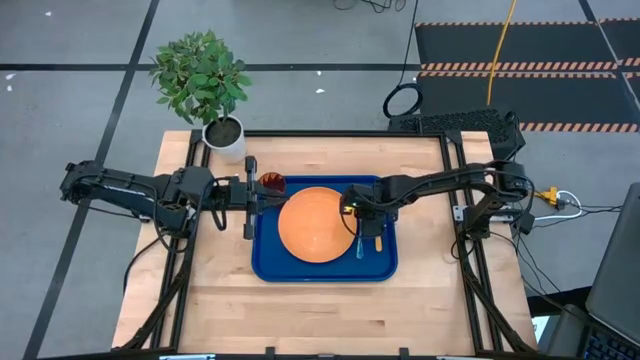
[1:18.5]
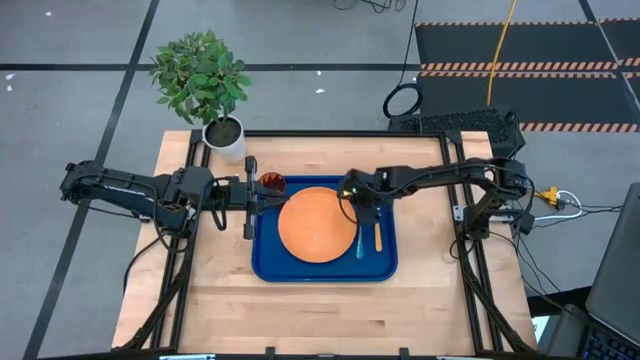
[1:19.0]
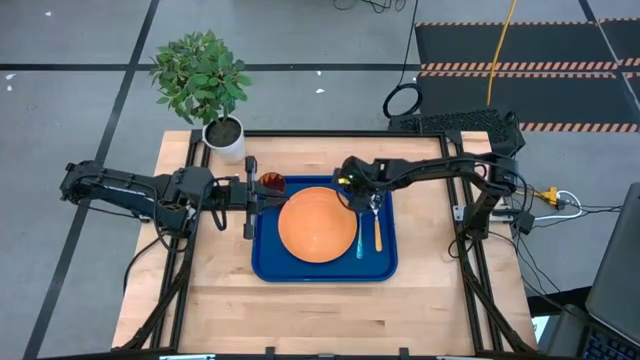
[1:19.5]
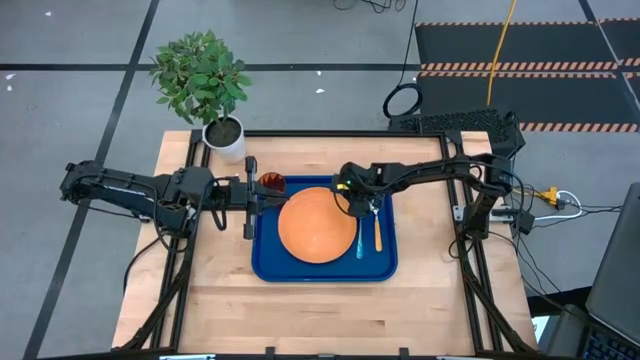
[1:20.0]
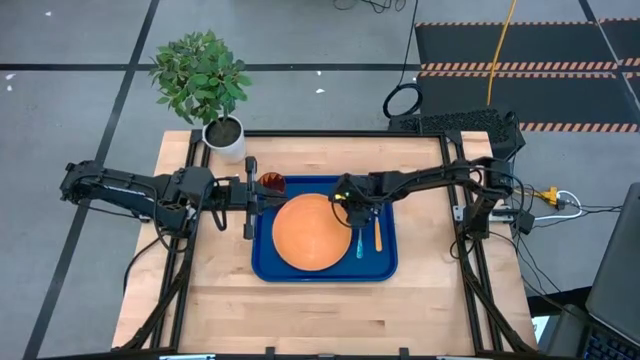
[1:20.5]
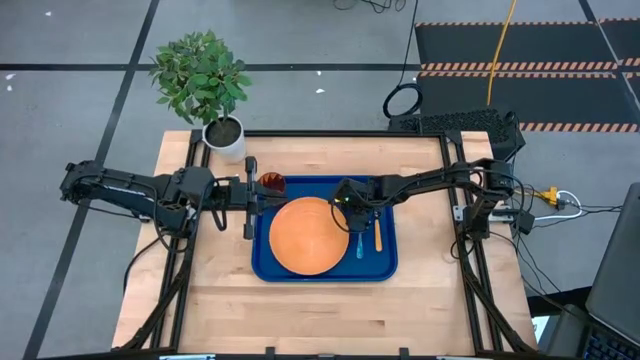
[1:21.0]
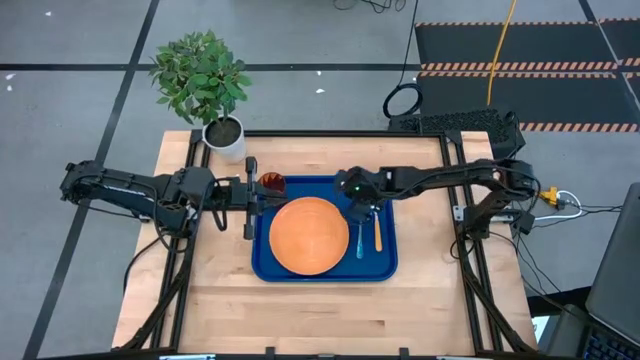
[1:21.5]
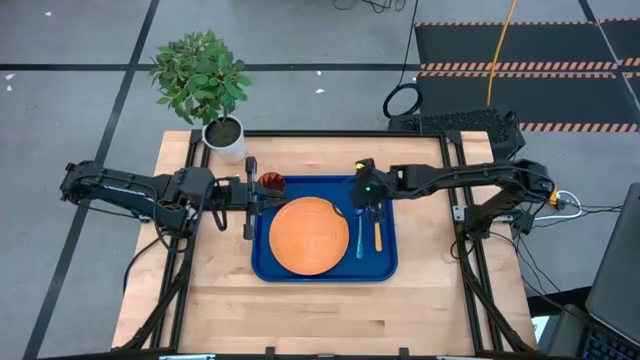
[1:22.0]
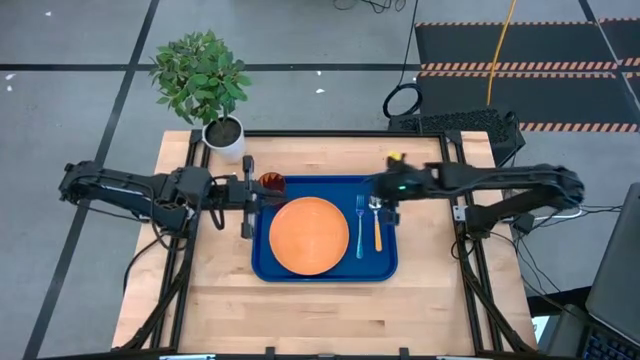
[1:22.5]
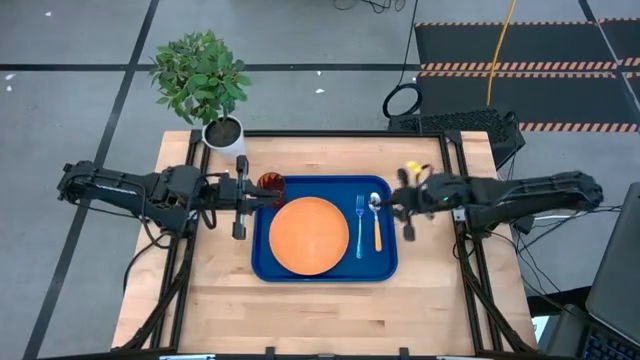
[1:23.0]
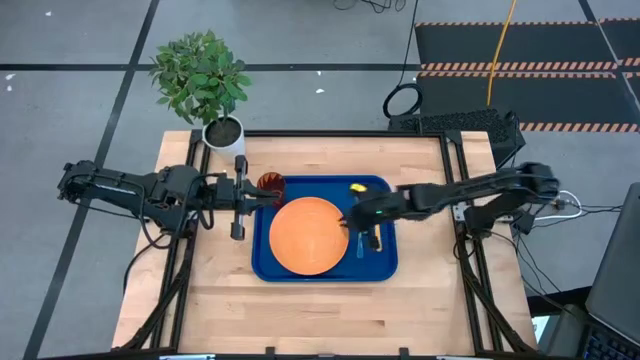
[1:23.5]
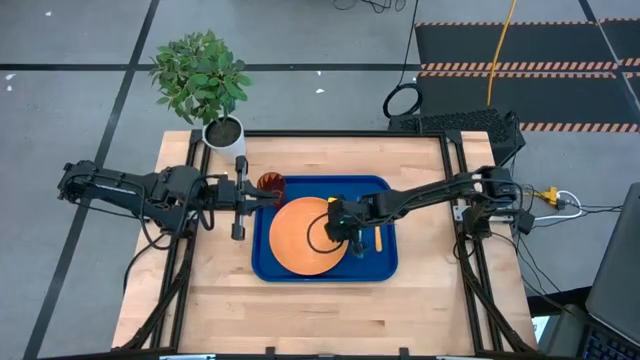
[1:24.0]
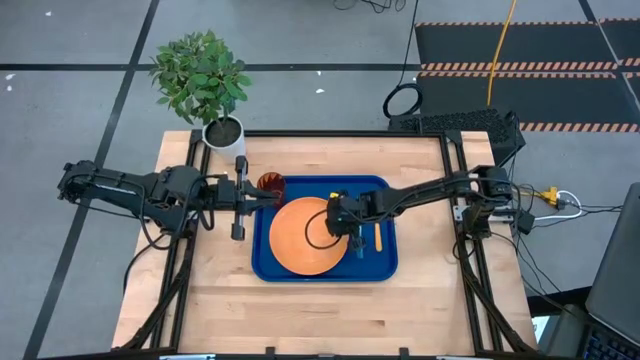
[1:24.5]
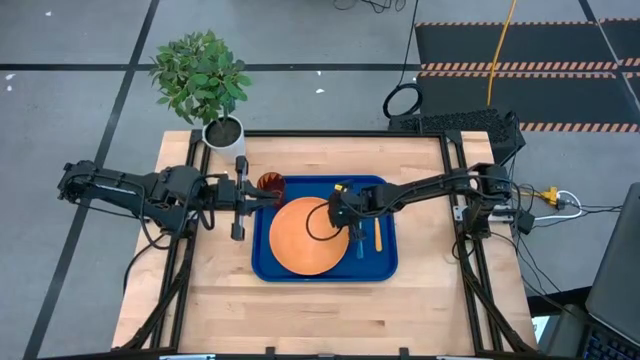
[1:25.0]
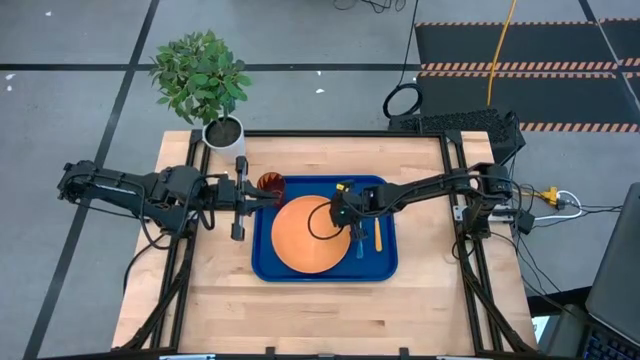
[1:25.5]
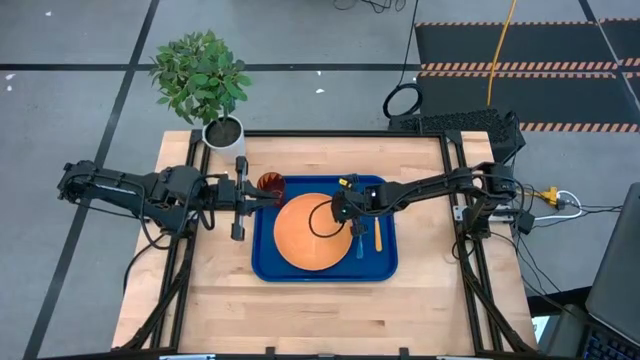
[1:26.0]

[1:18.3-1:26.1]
Task: Pick and place plate/cup/fork/spoon on tray
Adjust the plate on the serving tray

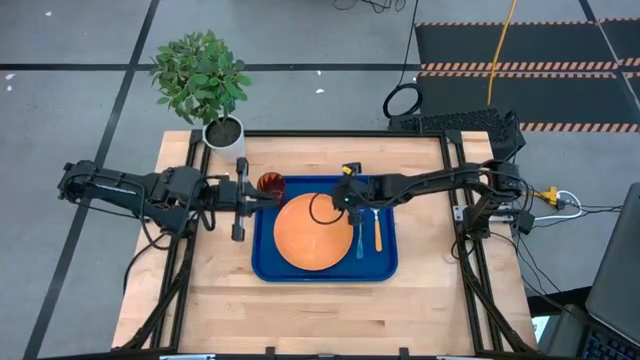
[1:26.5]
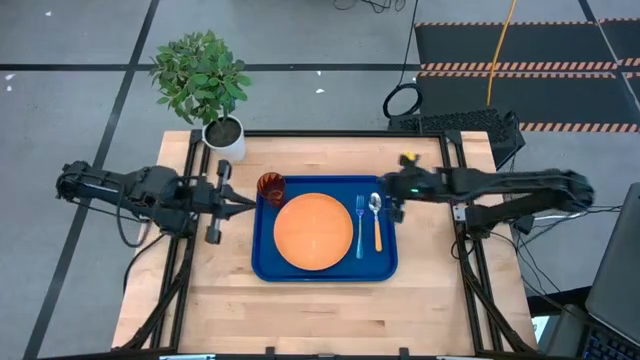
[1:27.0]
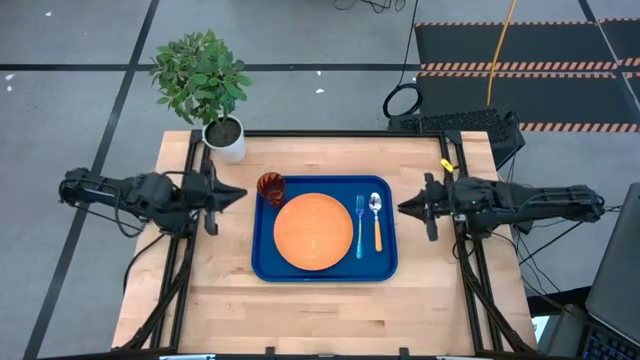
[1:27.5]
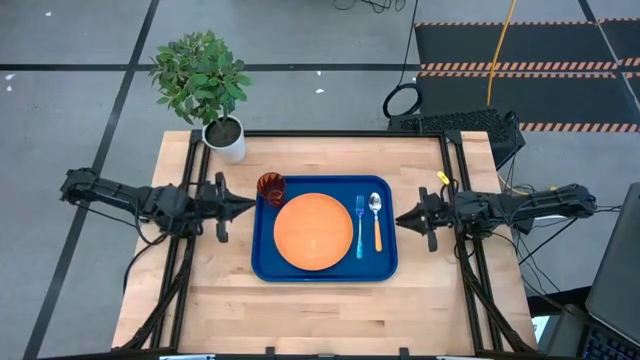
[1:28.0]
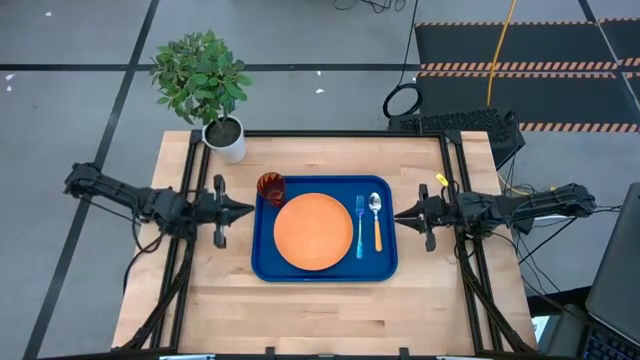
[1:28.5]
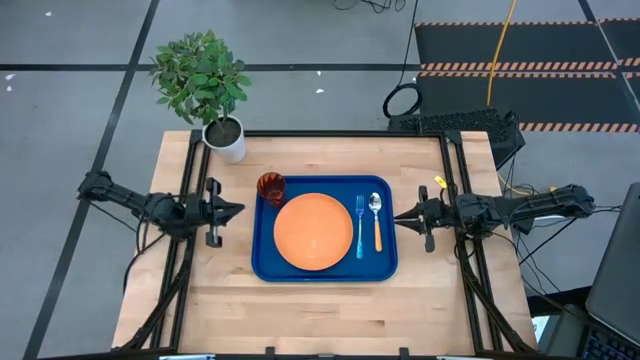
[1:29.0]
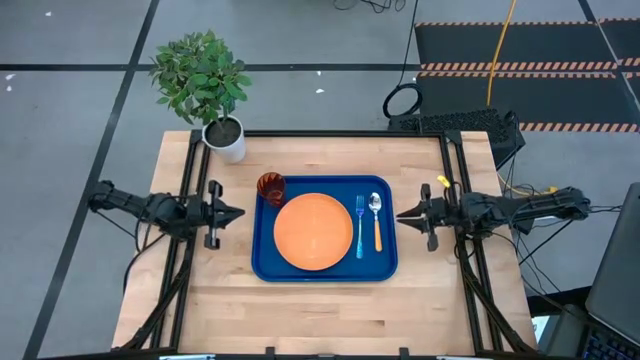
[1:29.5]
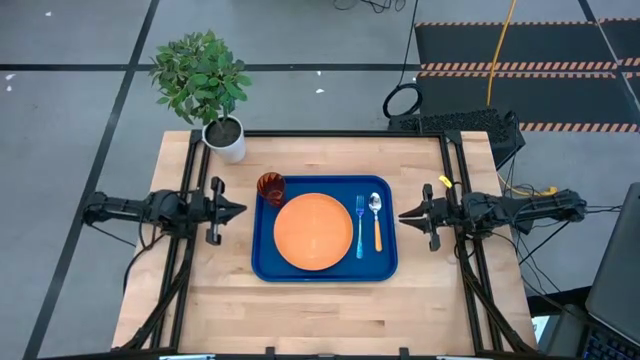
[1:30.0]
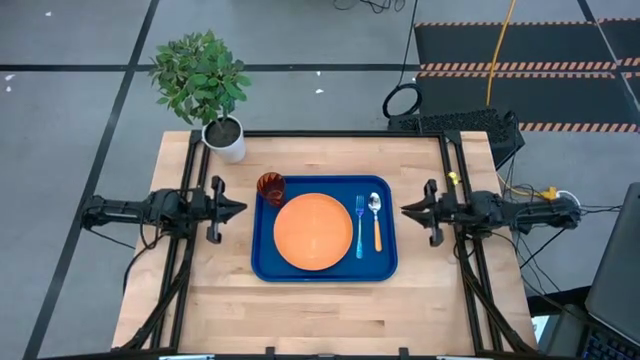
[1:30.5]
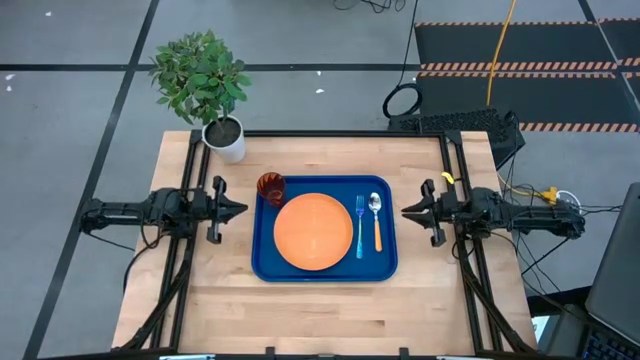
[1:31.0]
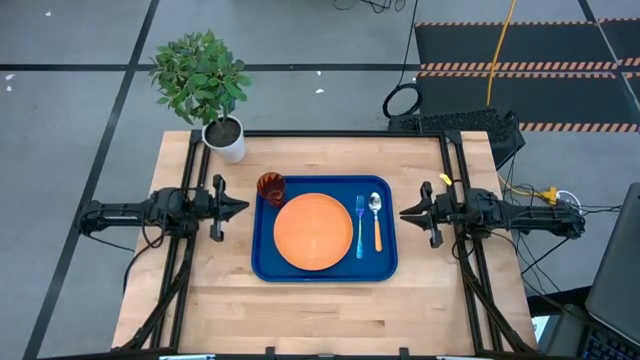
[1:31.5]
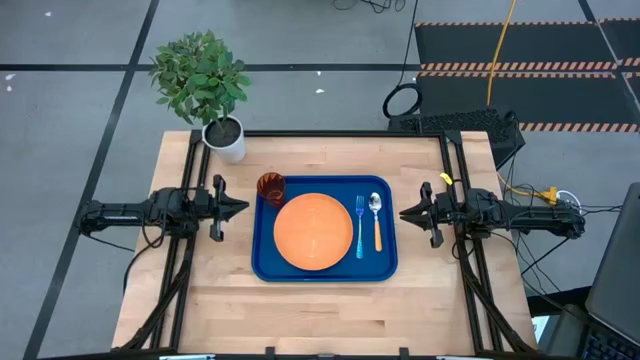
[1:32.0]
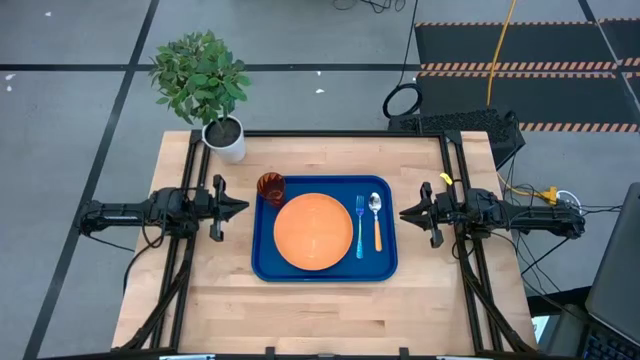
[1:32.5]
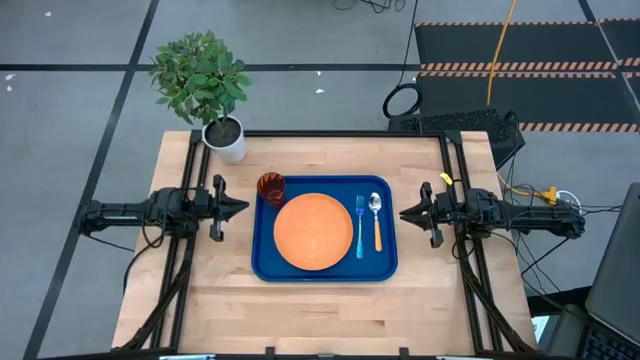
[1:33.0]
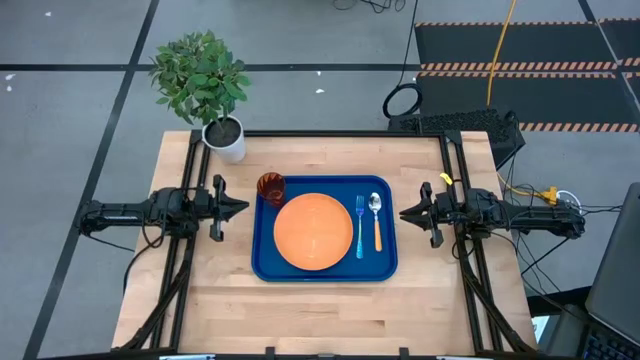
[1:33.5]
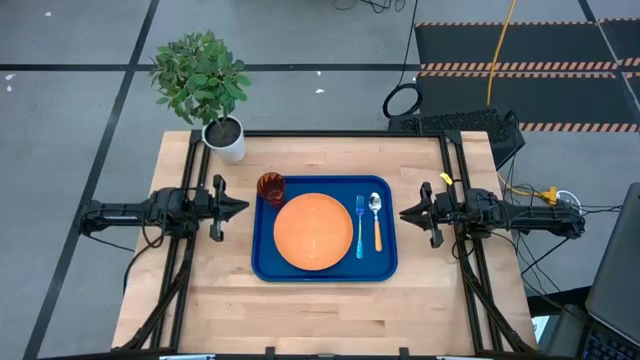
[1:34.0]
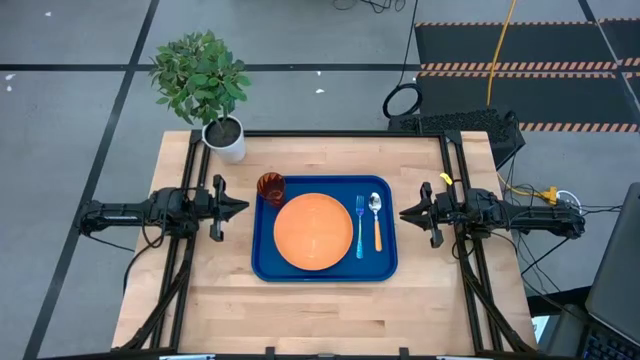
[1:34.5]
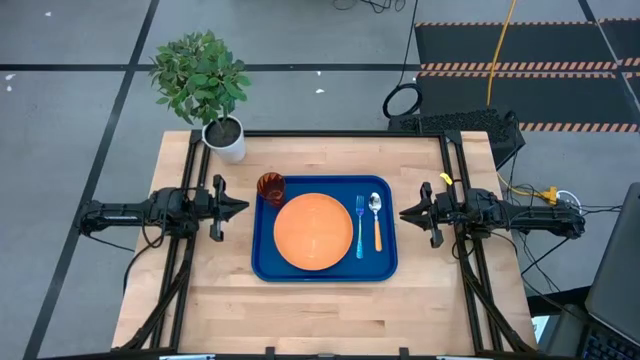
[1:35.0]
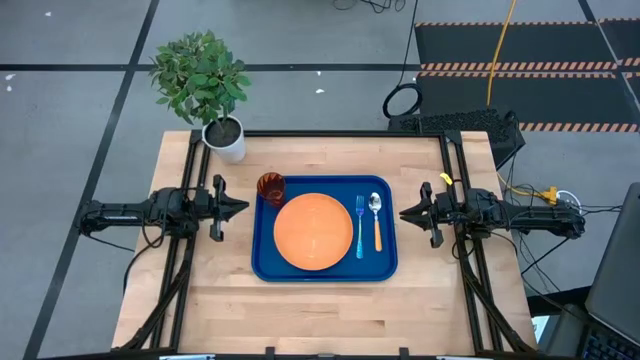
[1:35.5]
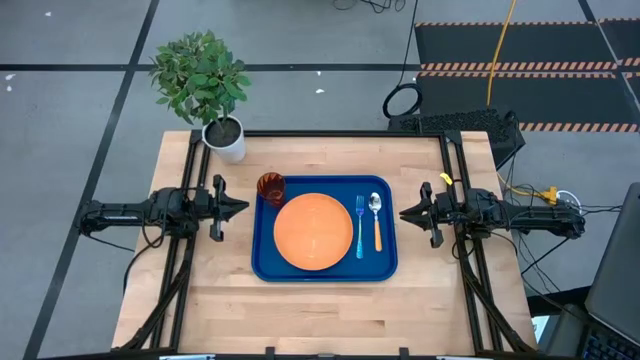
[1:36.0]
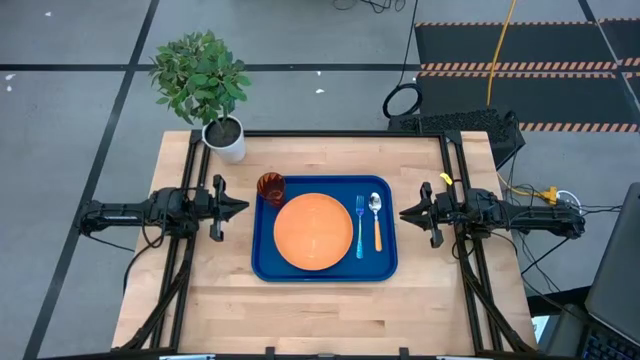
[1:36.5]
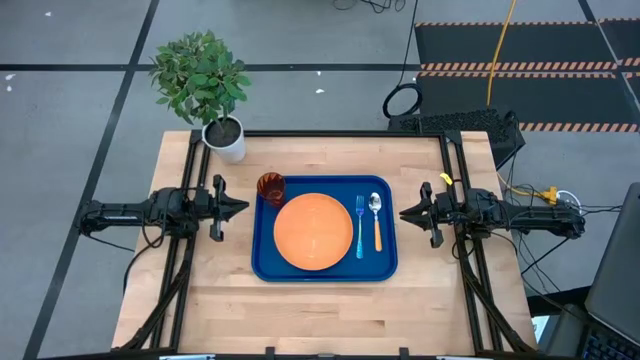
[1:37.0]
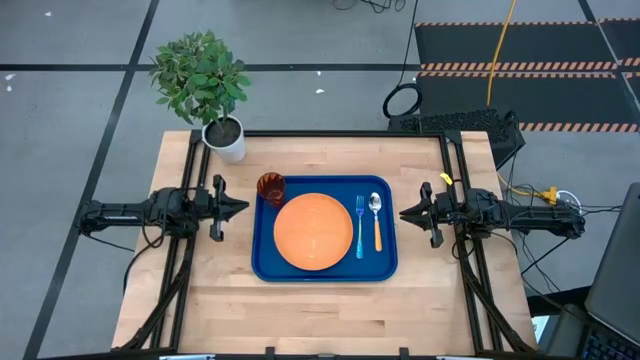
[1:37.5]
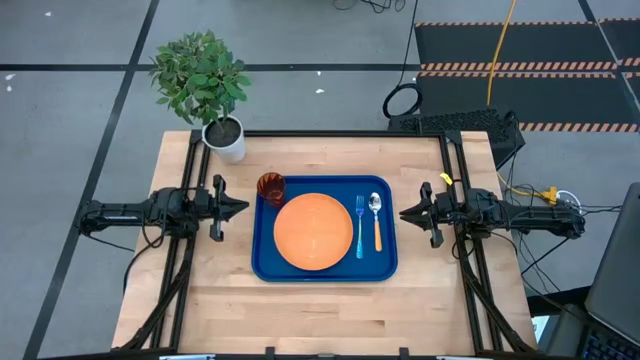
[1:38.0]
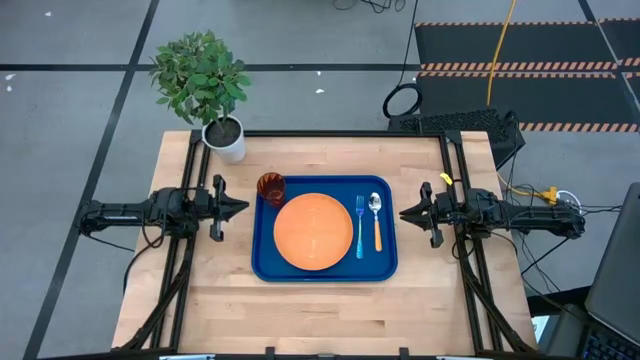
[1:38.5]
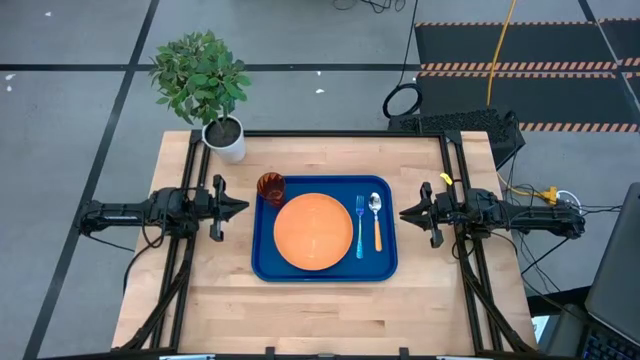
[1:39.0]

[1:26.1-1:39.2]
Return to Home Position
